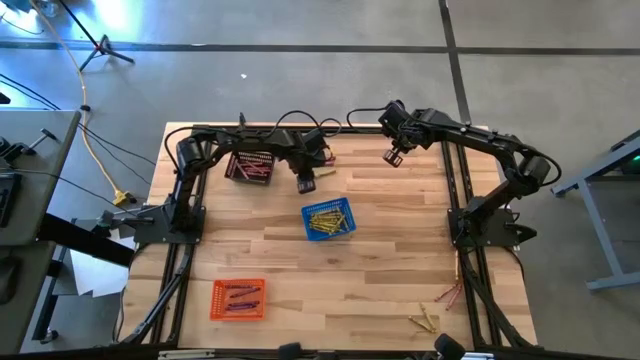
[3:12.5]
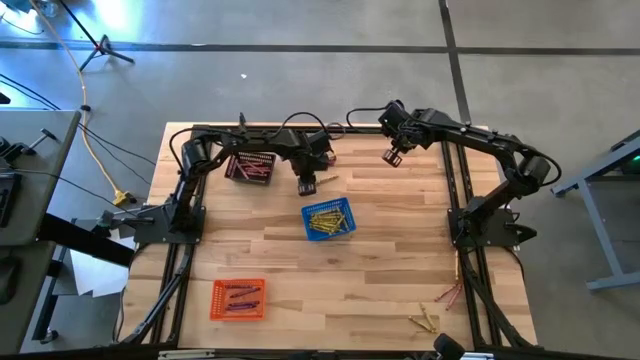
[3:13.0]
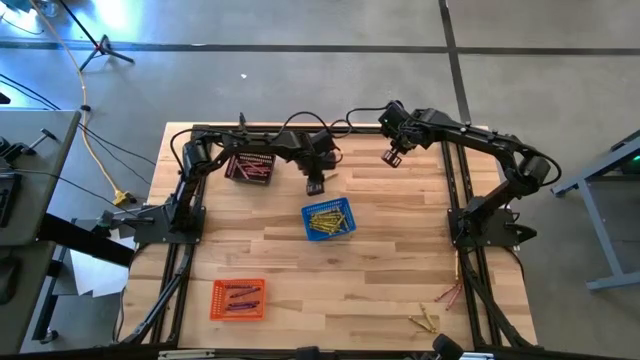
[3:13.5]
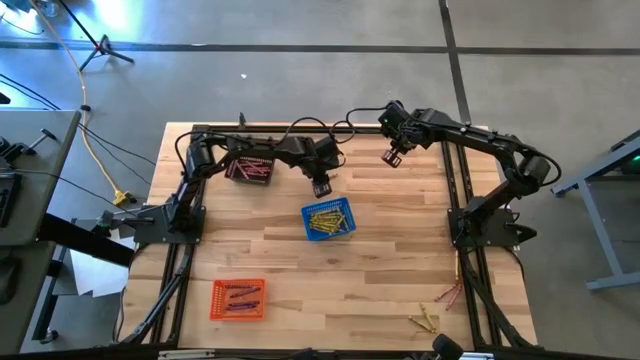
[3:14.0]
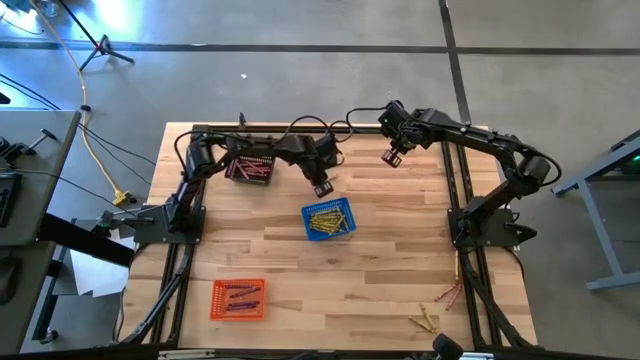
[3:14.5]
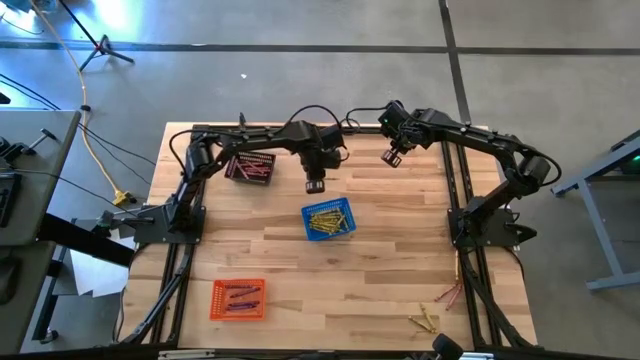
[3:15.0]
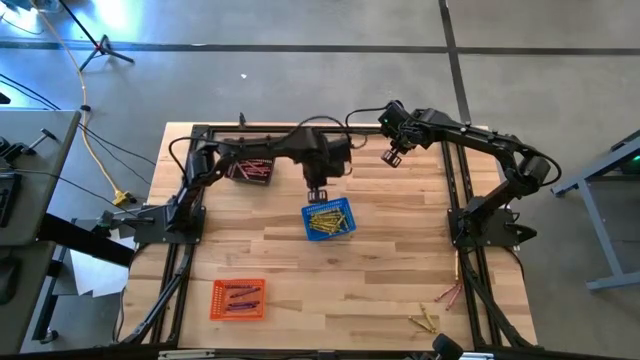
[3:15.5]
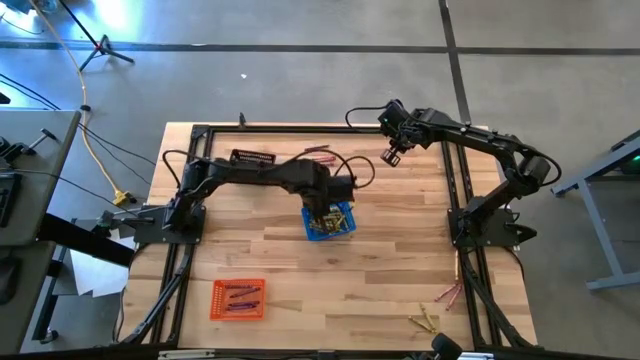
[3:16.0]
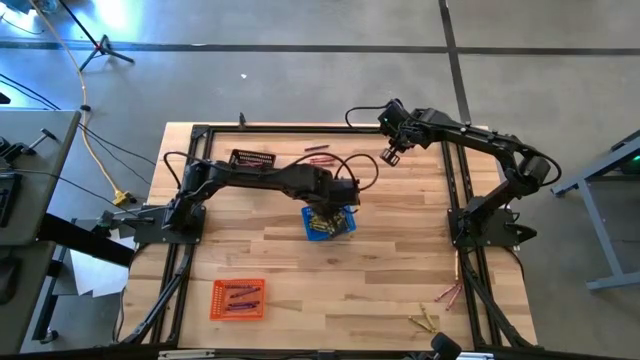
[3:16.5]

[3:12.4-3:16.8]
Task: Sort crayons
Put the yellow crayon into the blue basket

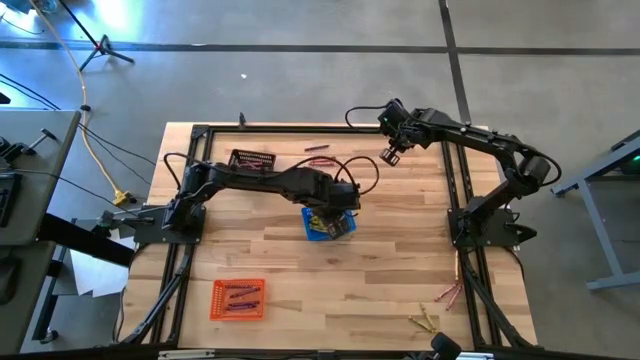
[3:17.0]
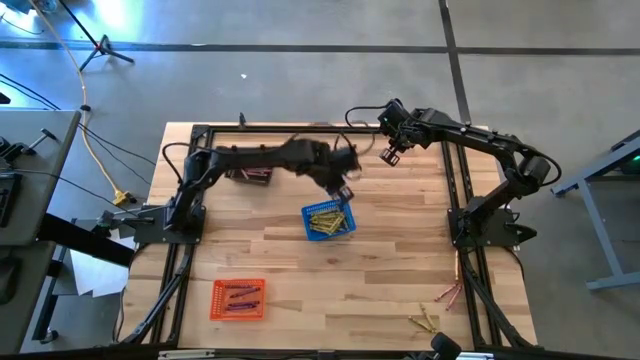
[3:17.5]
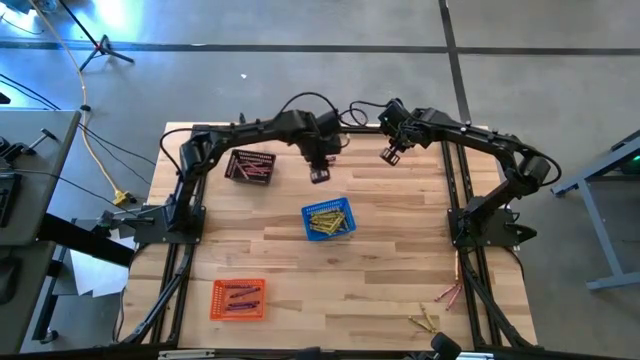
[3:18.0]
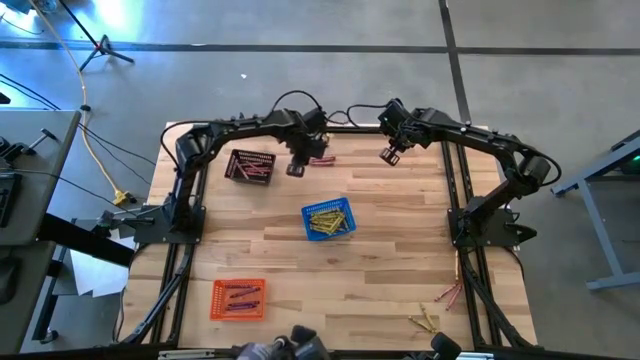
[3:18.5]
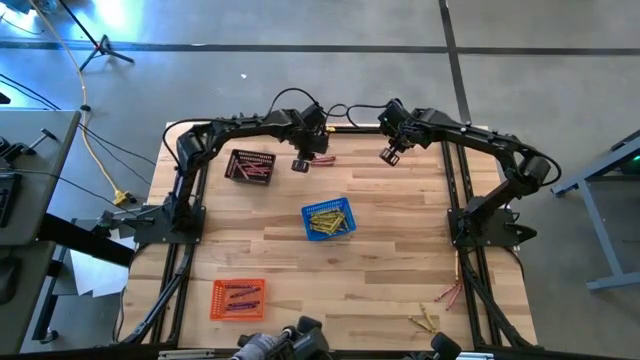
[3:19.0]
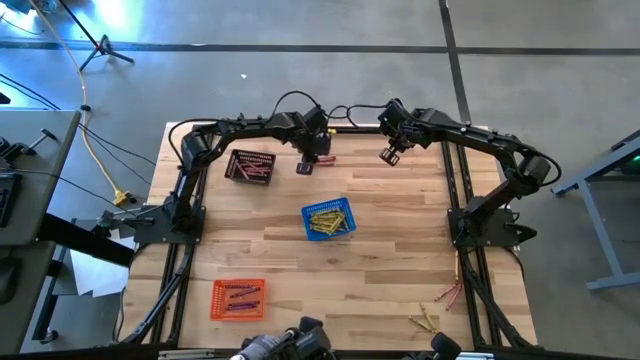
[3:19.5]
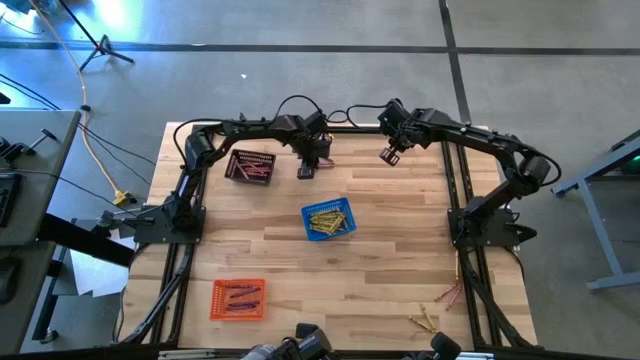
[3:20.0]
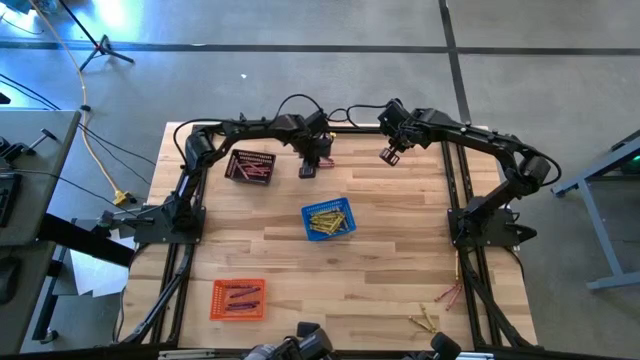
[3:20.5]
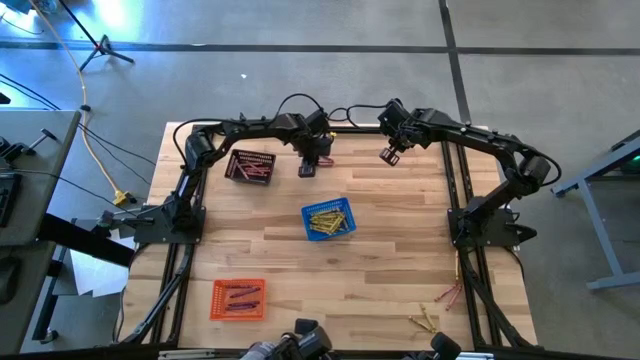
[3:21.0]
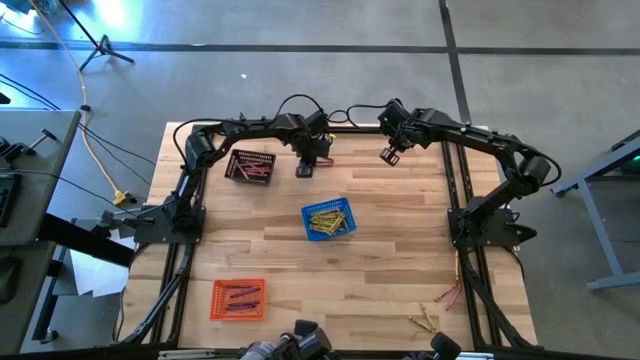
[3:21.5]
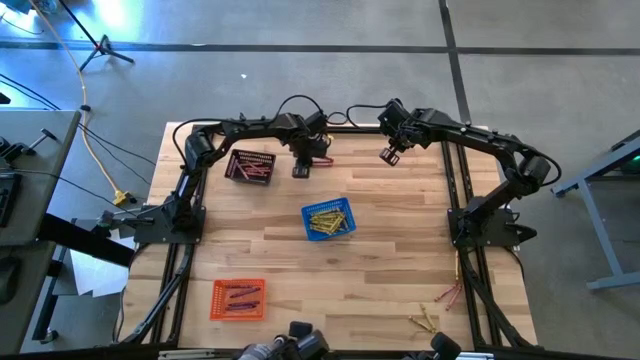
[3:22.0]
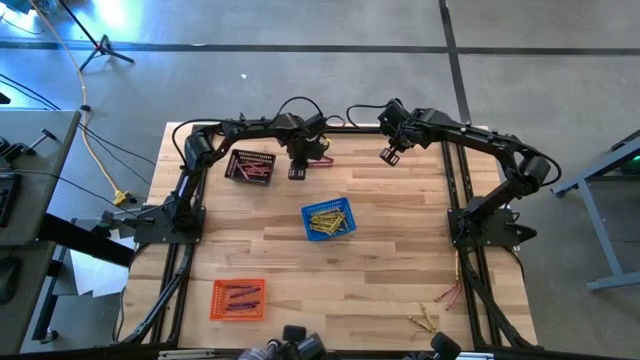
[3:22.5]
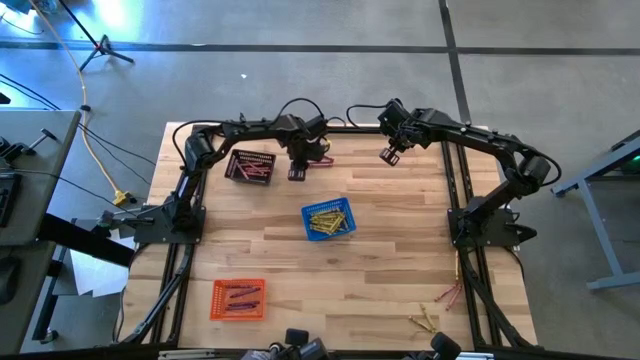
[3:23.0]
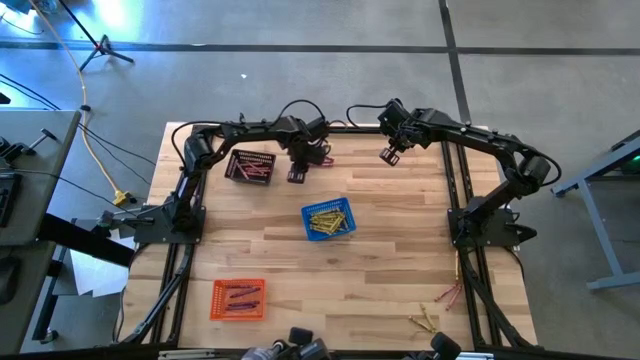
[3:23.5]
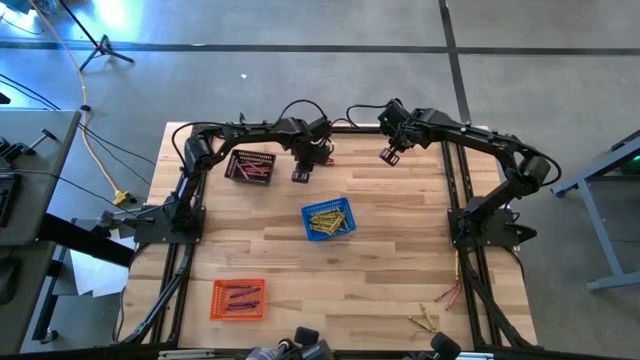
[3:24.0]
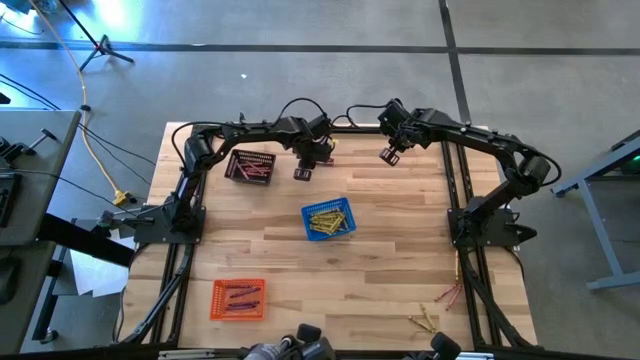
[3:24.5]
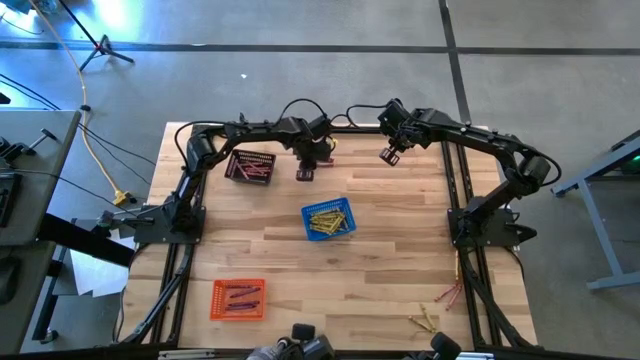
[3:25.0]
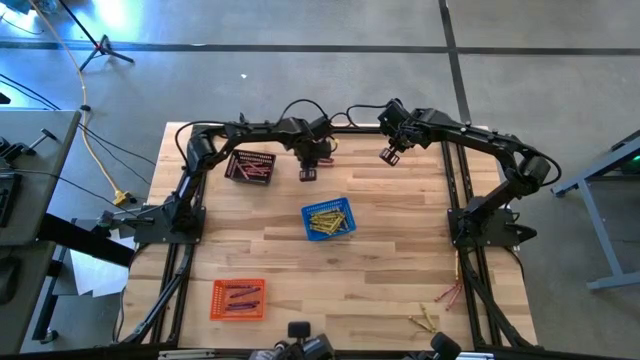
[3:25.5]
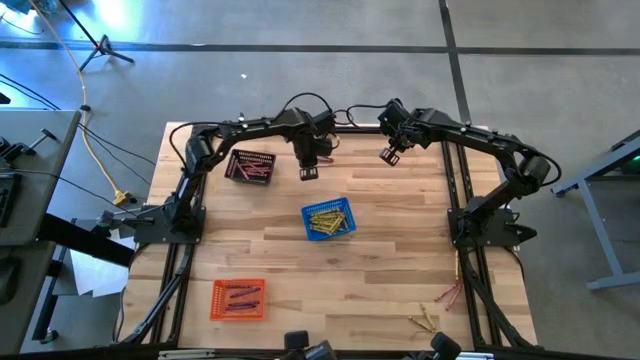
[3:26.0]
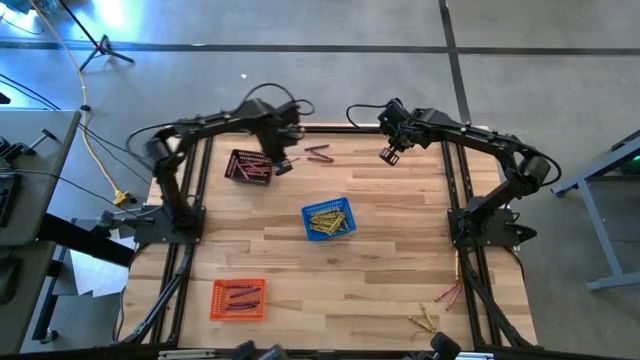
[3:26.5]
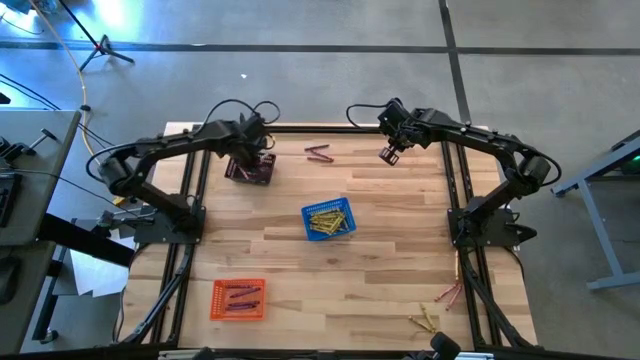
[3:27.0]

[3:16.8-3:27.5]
Put the red crayon into the black basket

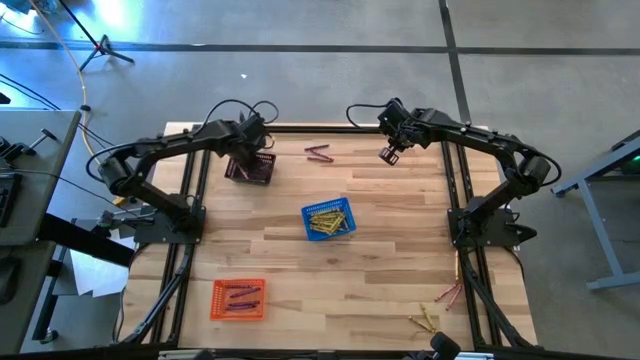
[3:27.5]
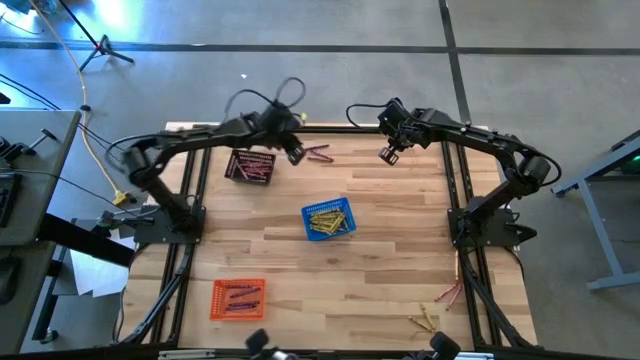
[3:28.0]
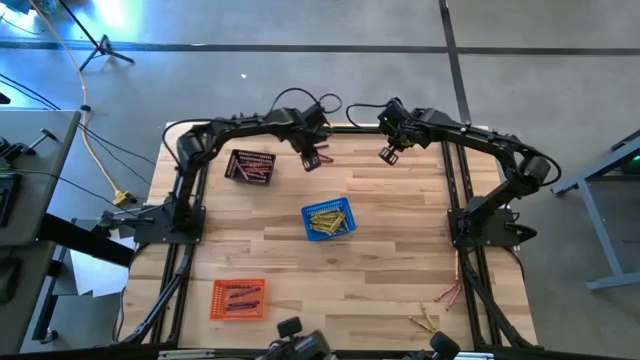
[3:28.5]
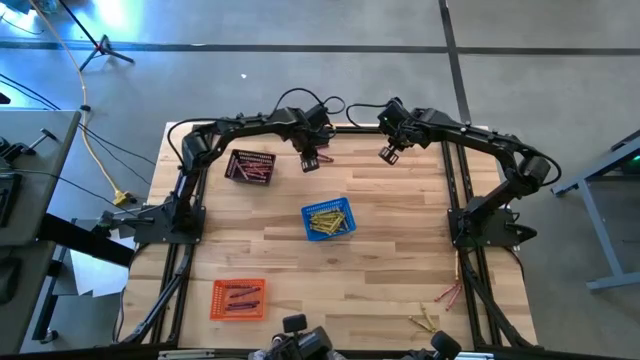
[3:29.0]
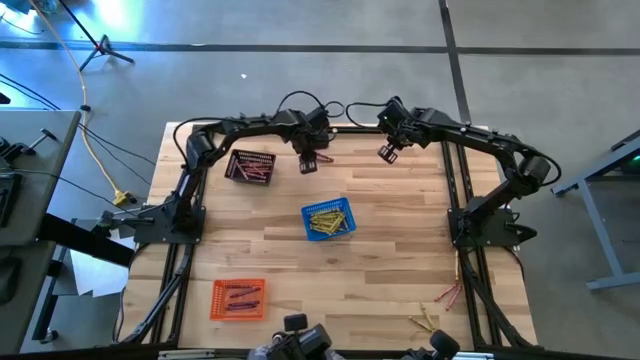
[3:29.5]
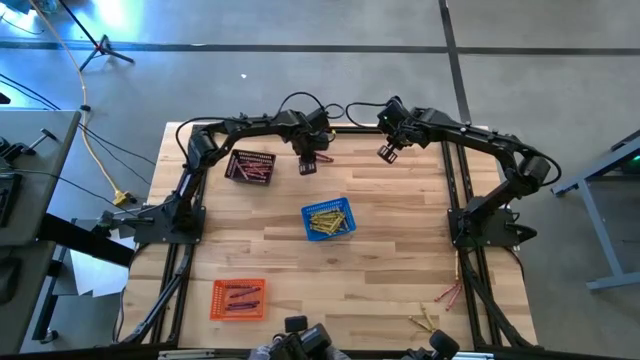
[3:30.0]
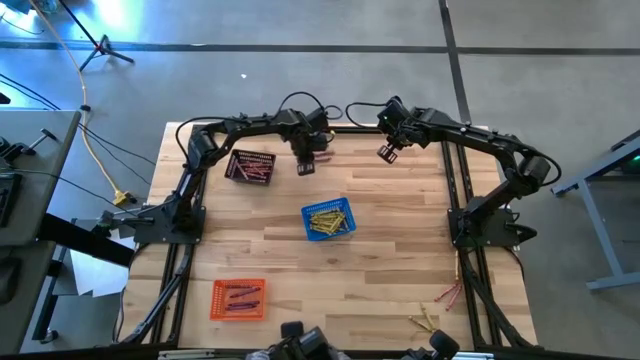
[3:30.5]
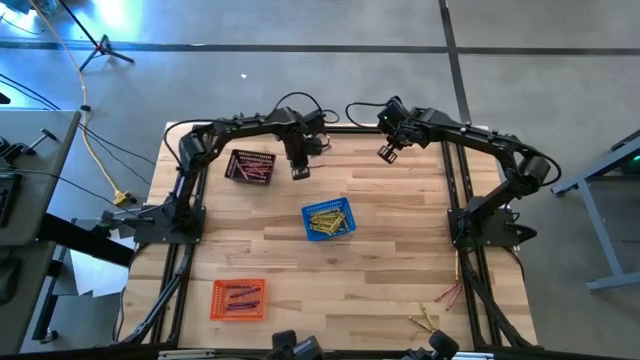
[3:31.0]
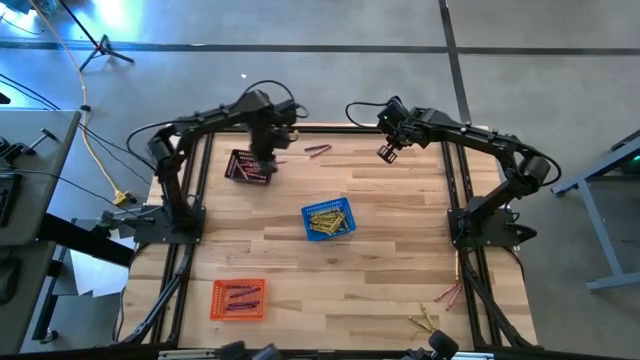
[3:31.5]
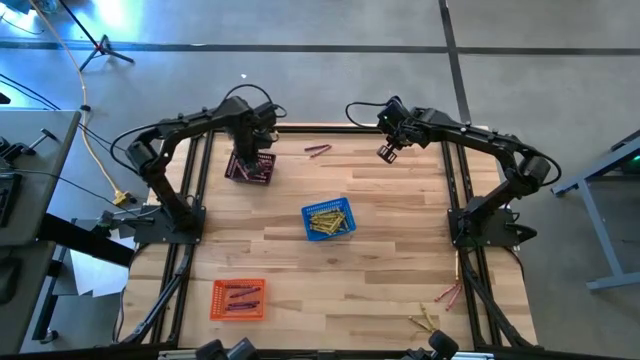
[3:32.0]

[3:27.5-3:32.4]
Put the red crayon into the black basket
